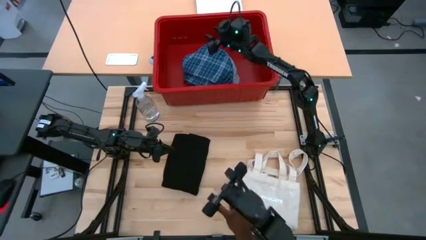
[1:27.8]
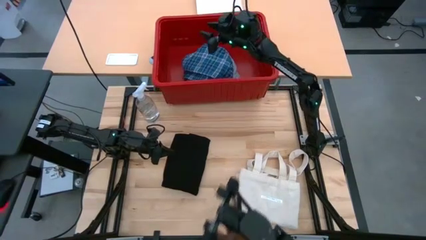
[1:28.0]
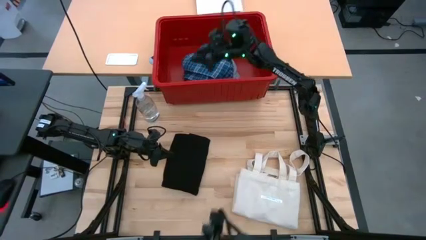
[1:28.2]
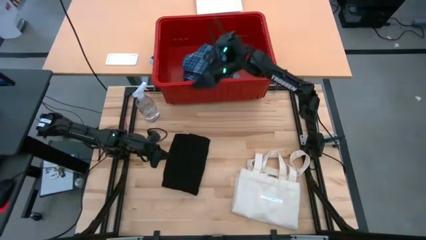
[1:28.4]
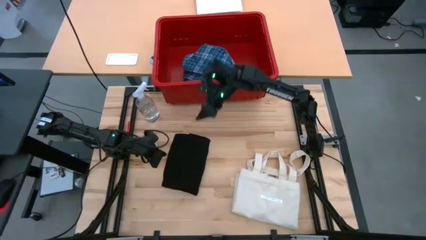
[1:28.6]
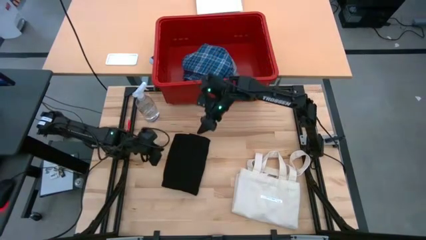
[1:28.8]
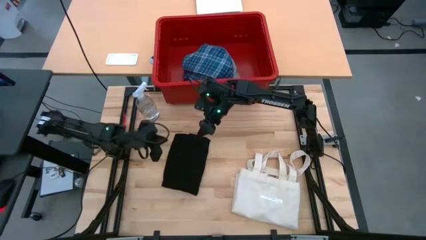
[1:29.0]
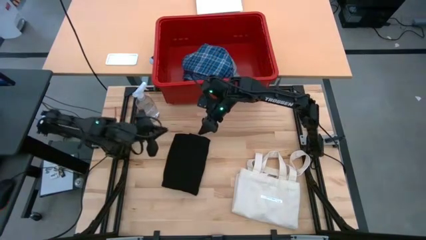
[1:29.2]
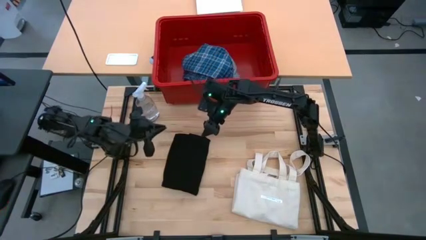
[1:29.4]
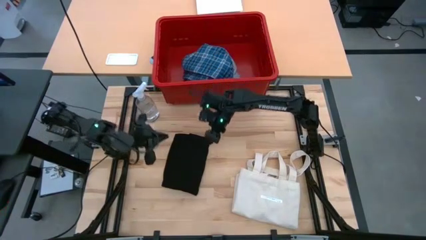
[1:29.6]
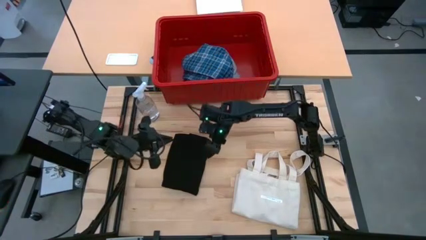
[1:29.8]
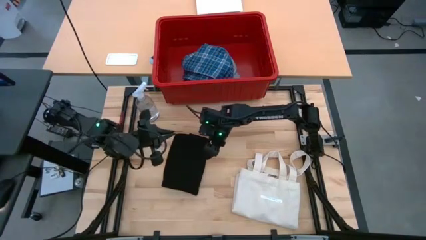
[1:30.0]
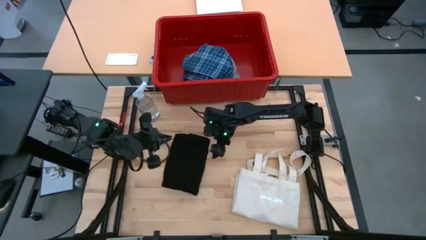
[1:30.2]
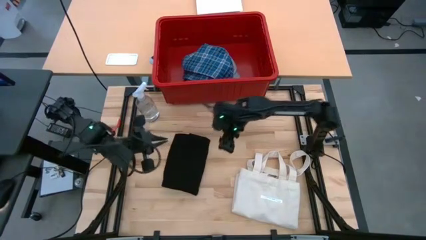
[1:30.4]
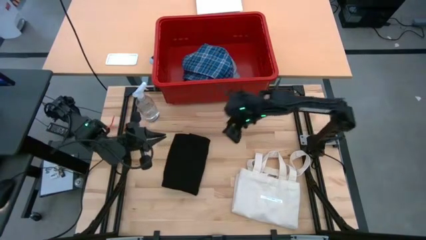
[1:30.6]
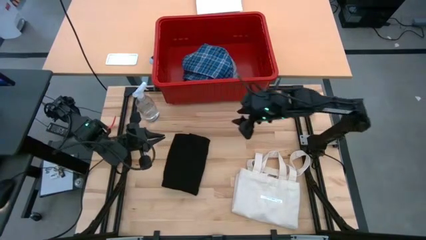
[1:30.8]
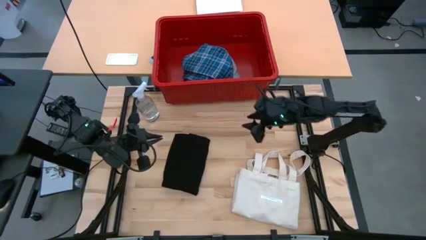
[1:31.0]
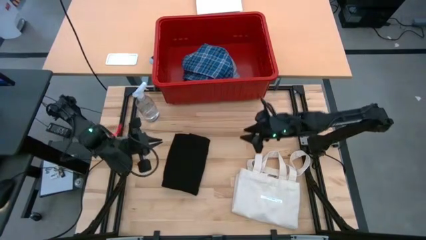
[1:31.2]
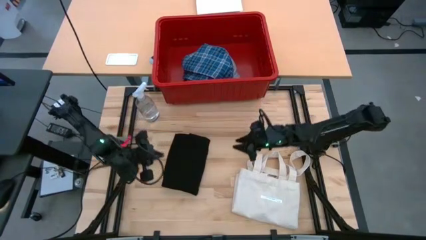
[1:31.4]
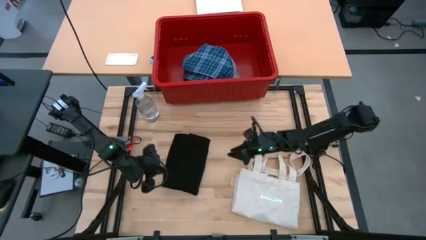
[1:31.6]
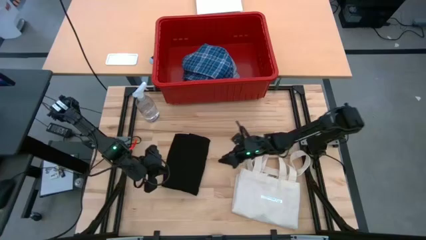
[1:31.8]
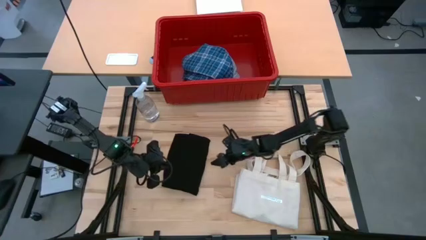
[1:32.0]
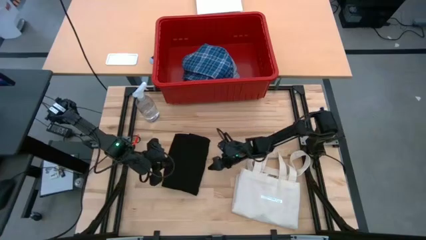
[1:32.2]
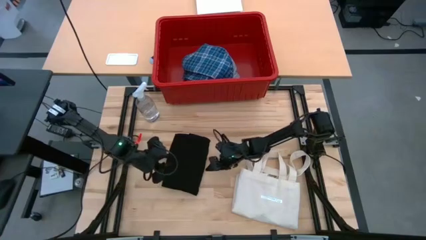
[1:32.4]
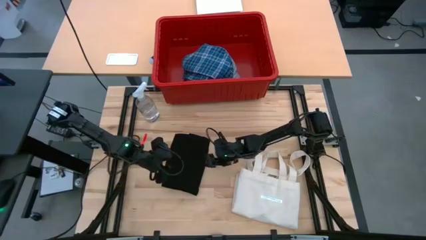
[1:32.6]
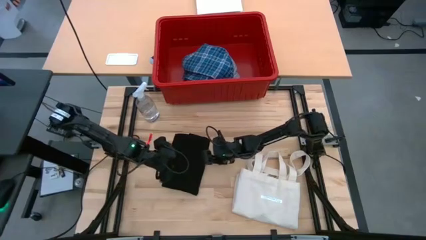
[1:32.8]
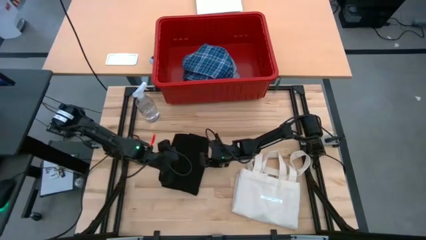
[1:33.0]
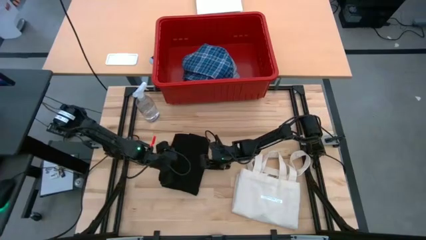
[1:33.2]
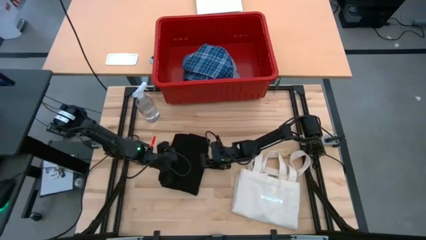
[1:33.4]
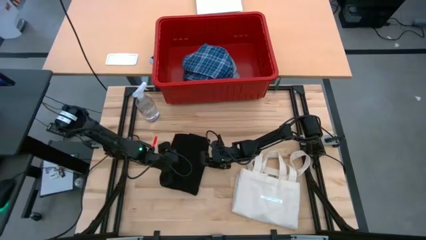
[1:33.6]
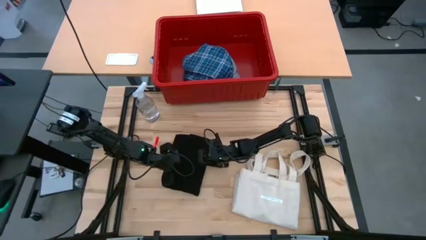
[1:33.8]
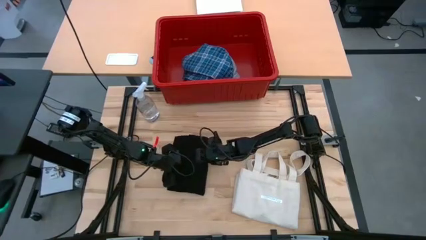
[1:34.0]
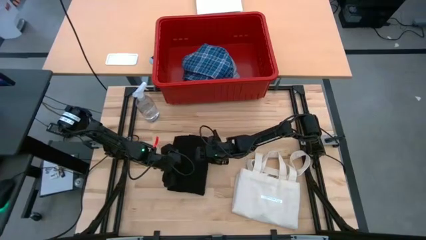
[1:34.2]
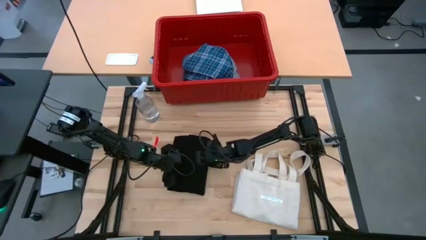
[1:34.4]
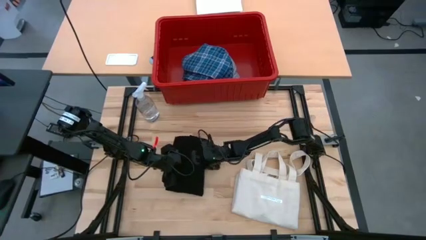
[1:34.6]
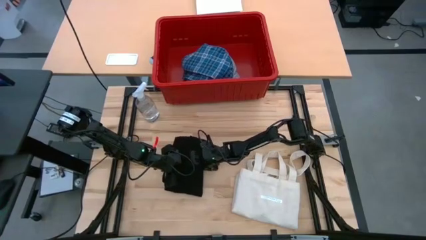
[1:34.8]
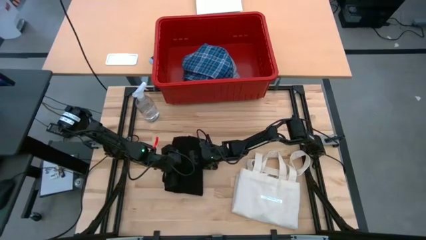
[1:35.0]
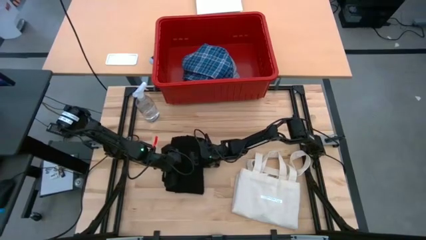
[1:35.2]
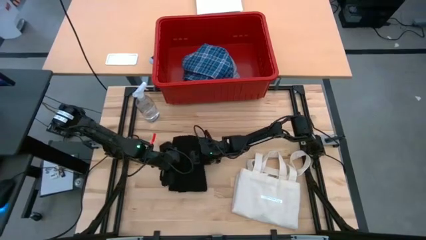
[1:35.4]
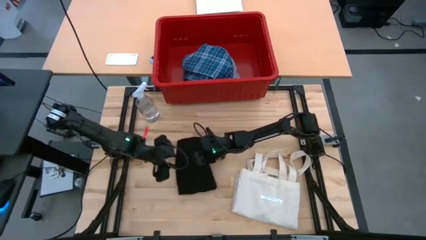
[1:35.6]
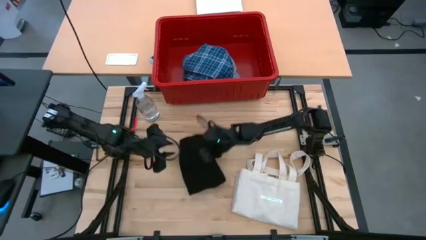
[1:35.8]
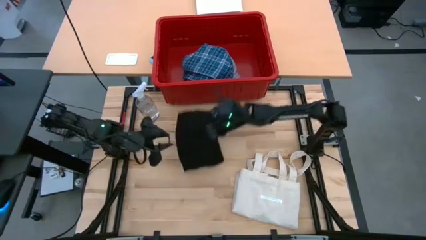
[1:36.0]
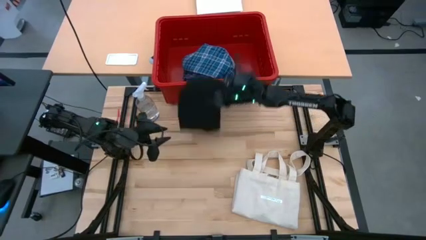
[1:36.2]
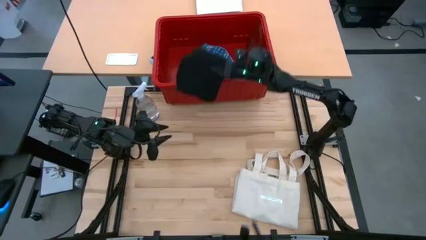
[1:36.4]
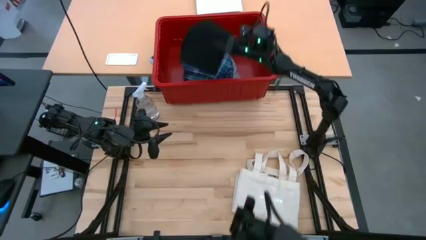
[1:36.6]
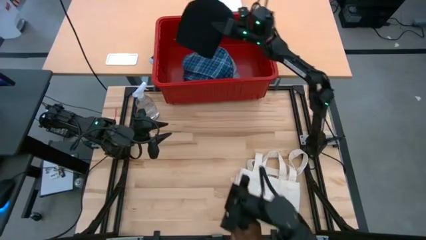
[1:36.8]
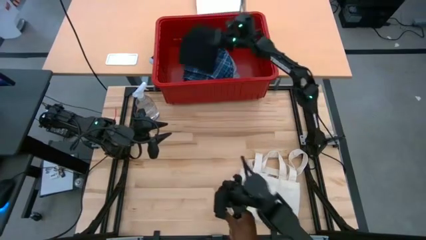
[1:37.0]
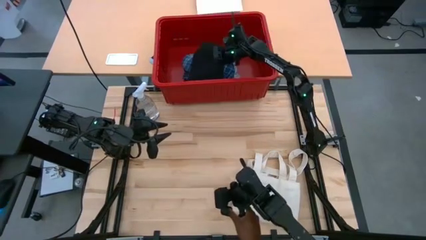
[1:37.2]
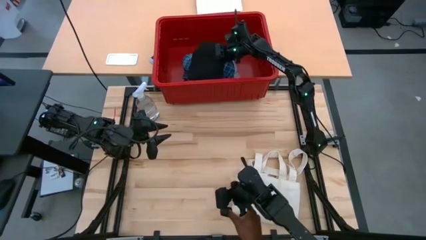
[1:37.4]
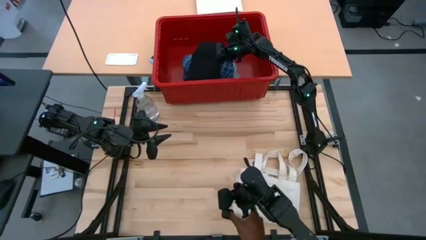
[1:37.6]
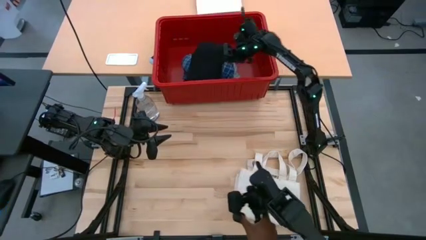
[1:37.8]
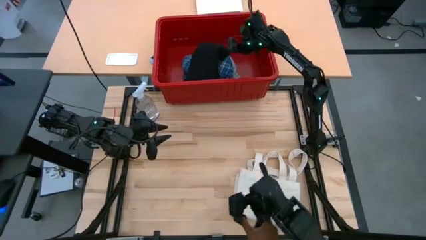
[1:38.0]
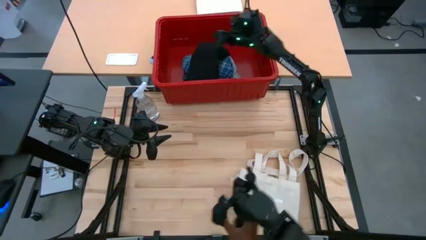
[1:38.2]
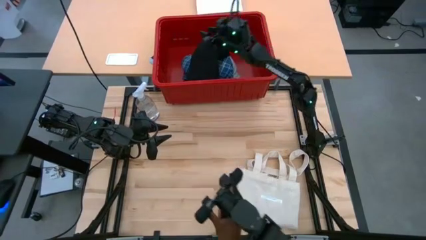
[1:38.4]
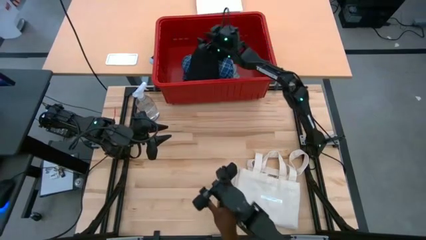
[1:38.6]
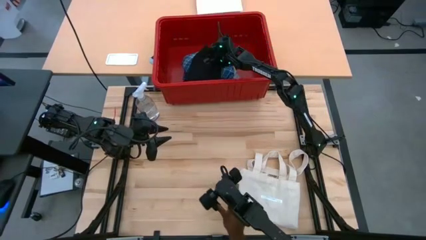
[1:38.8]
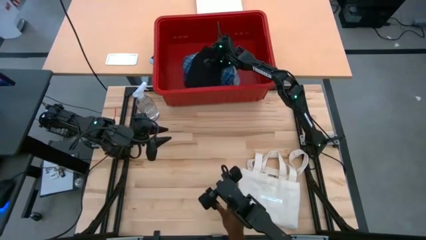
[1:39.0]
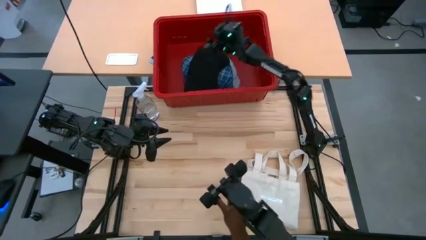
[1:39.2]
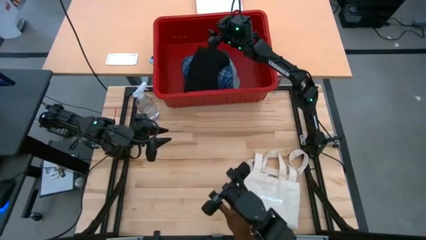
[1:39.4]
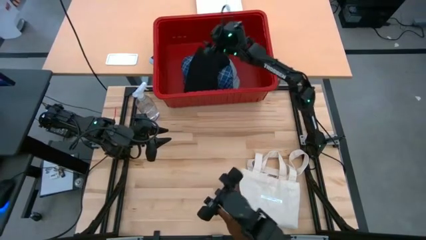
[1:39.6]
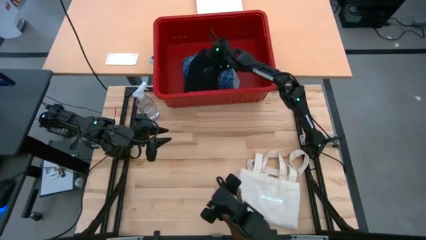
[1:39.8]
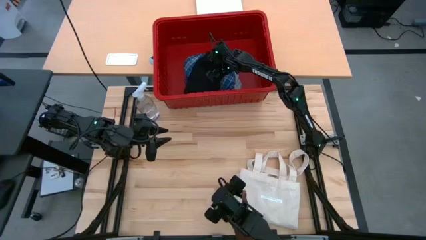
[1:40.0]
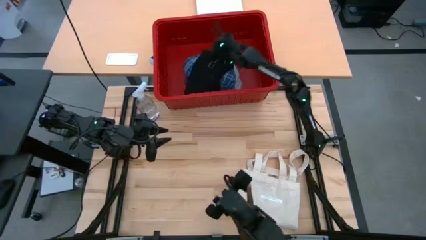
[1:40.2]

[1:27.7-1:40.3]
Task: Fold laundry
Put the black shirt into the red bin

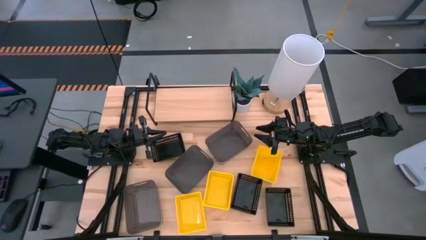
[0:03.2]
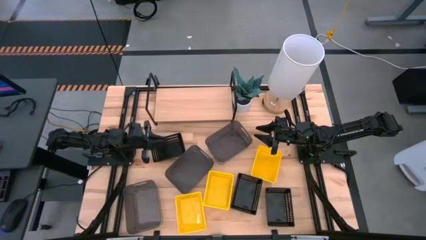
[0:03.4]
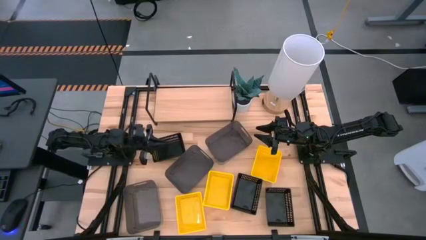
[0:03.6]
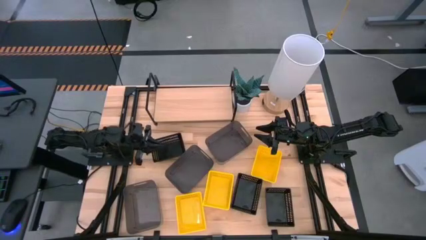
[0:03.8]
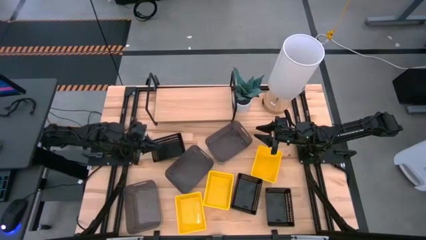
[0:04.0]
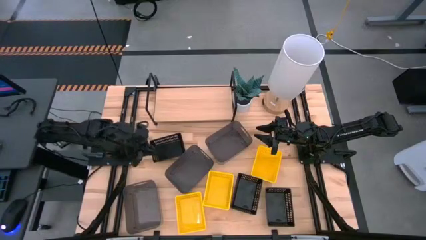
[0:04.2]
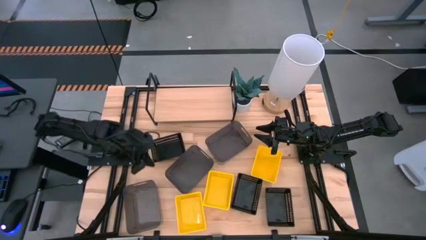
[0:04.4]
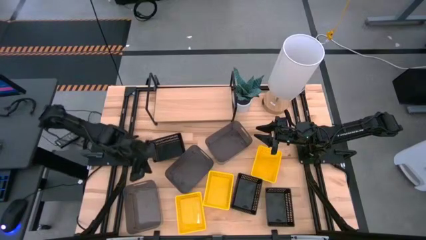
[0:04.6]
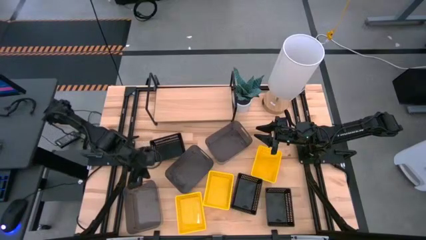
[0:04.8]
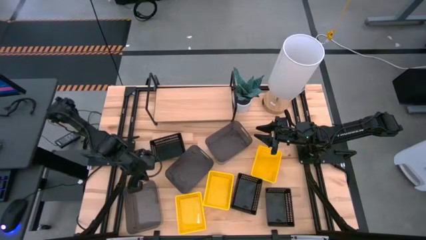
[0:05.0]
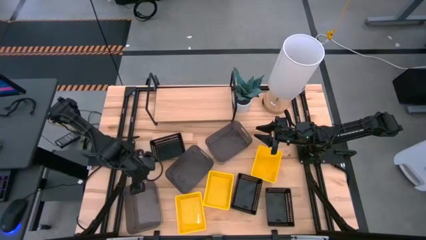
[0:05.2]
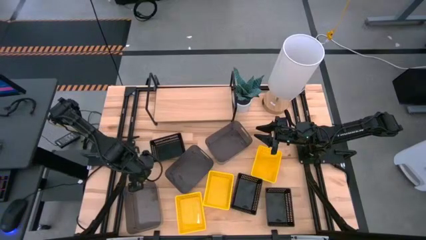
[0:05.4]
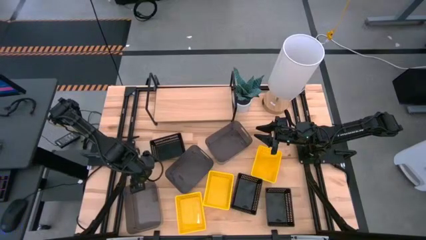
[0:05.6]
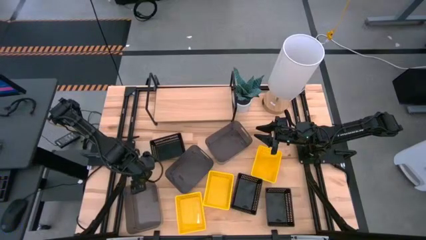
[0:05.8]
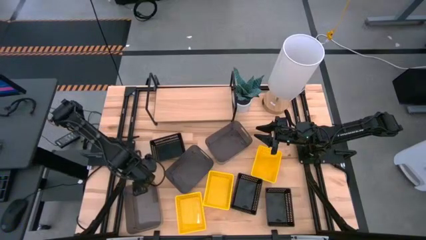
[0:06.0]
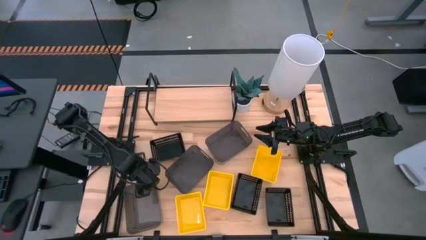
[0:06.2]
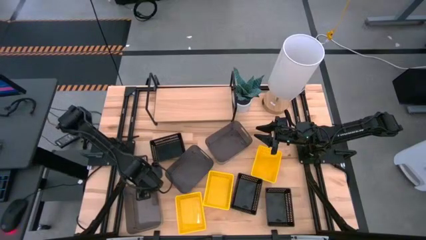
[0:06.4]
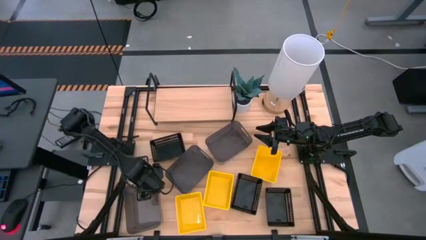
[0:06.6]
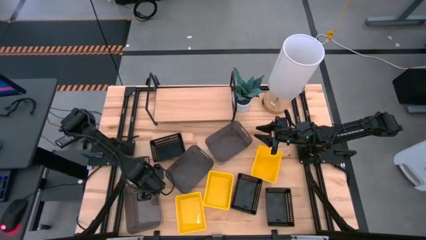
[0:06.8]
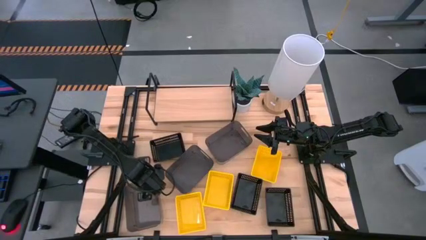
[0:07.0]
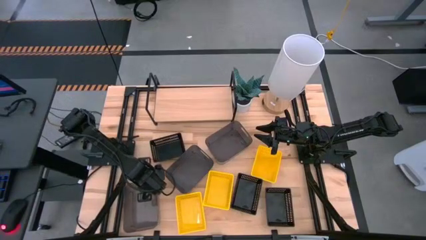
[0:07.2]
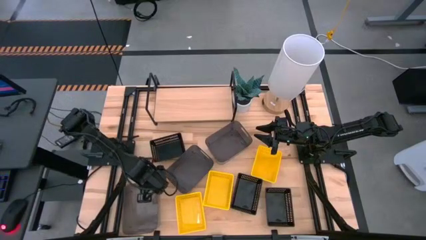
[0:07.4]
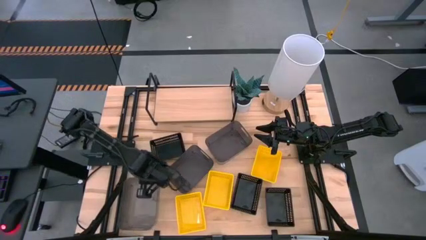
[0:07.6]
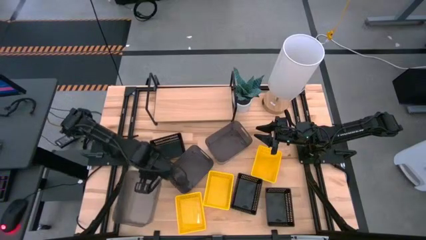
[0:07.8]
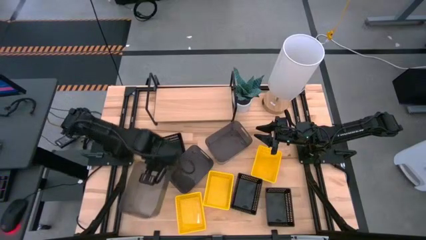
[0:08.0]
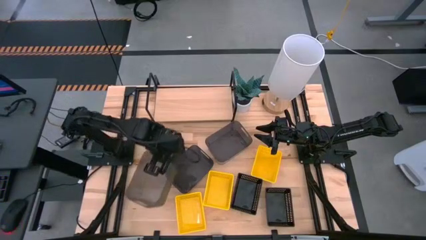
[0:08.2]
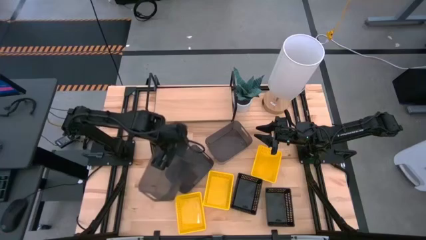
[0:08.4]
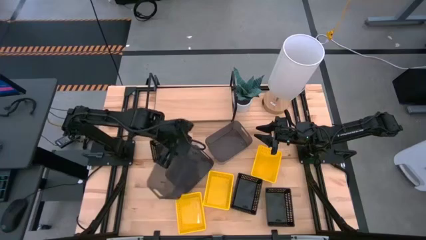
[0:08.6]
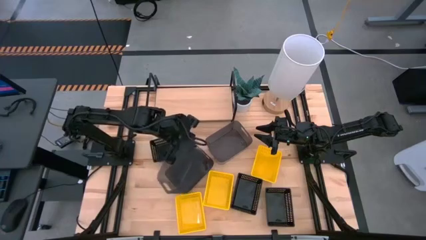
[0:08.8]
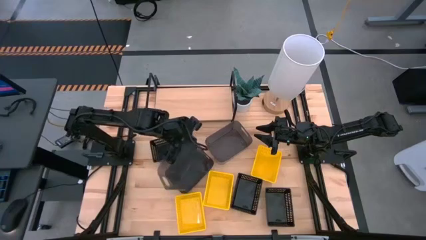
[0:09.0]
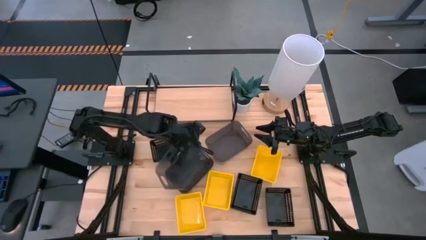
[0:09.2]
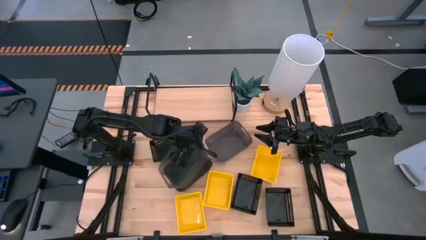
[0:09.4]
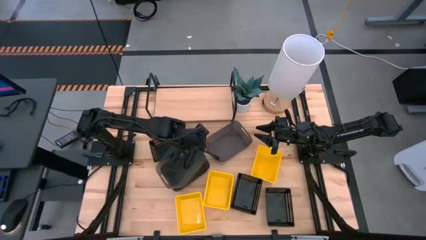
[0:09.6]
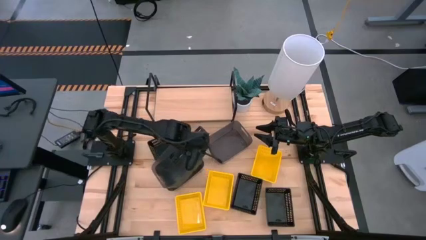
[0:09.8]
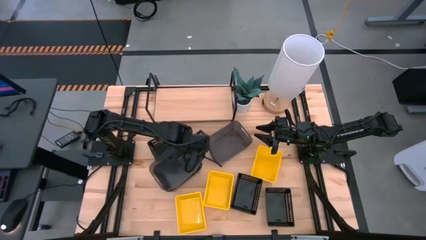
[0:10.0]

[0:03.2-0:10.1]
Task: Stack baskets on shelf by color
Stack the bottom left transparent black bin on top of the middle transparent black bin
